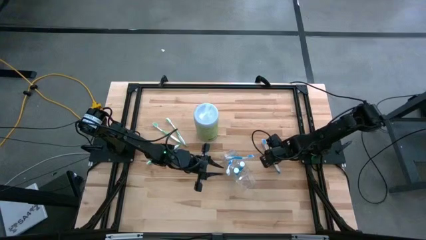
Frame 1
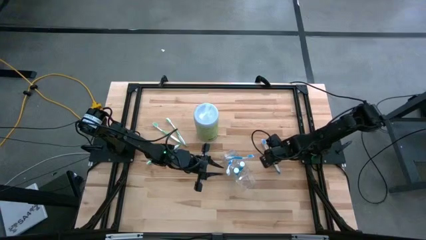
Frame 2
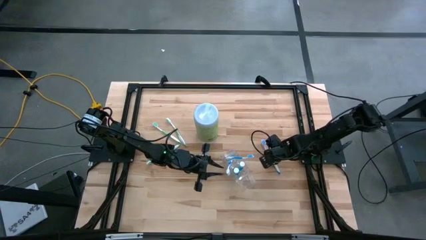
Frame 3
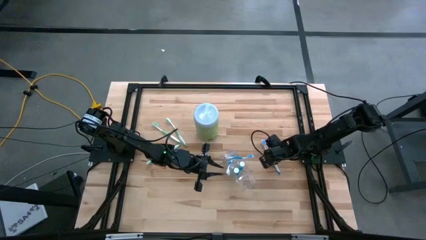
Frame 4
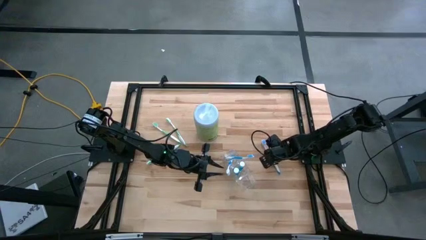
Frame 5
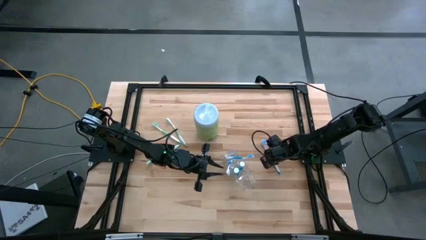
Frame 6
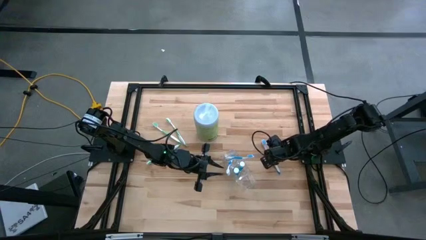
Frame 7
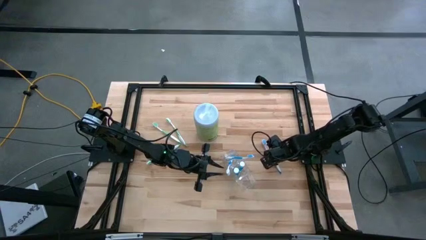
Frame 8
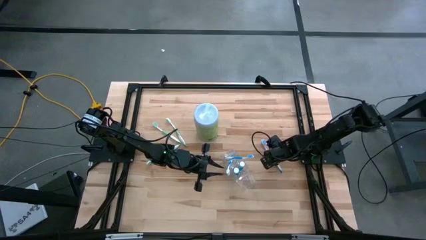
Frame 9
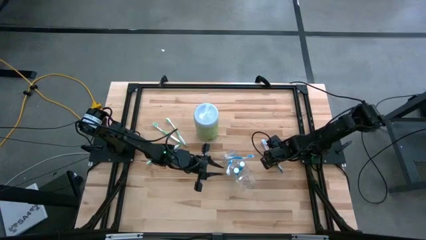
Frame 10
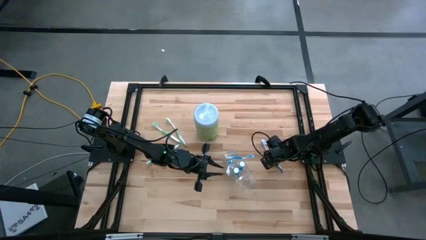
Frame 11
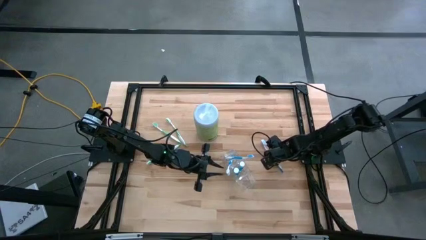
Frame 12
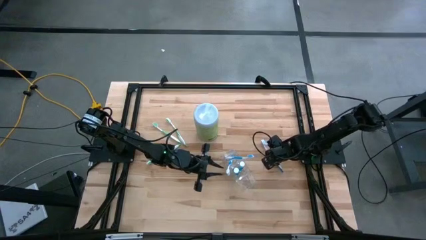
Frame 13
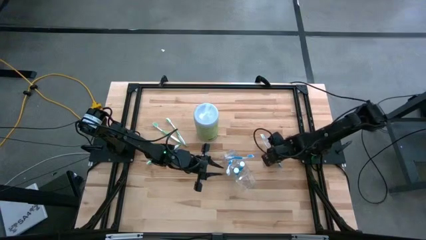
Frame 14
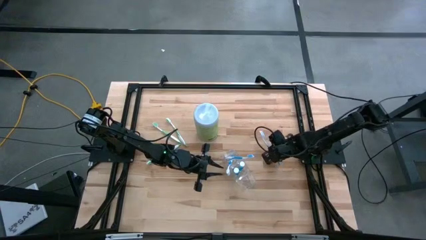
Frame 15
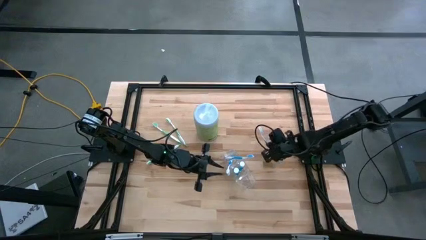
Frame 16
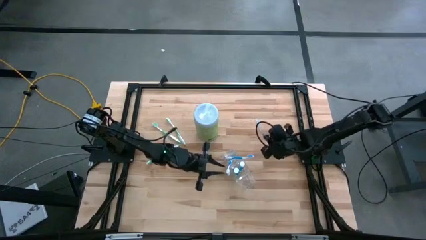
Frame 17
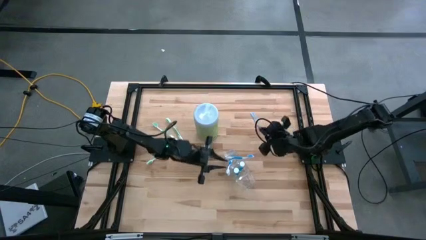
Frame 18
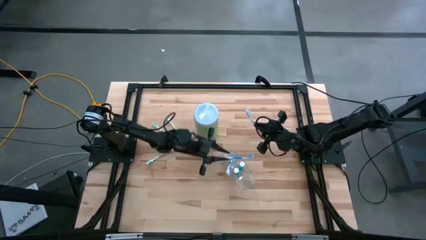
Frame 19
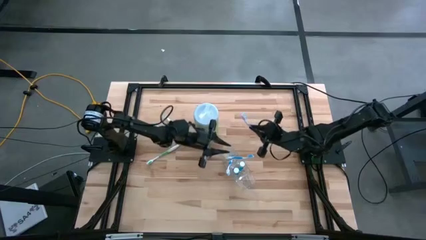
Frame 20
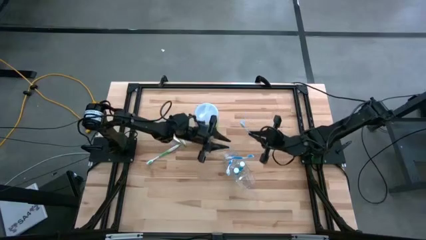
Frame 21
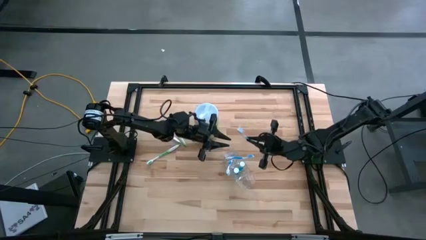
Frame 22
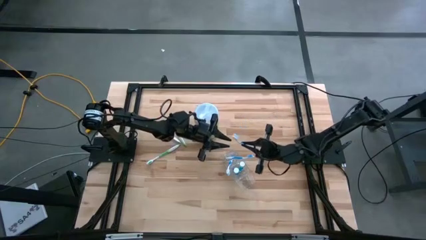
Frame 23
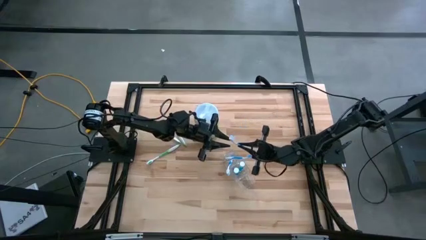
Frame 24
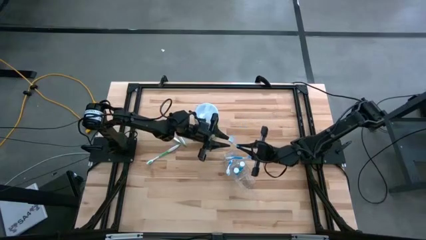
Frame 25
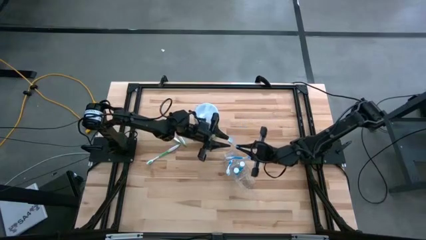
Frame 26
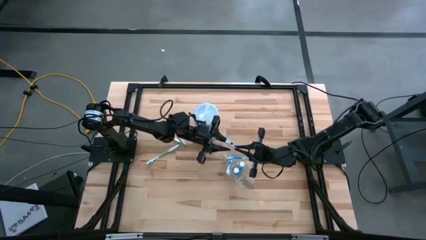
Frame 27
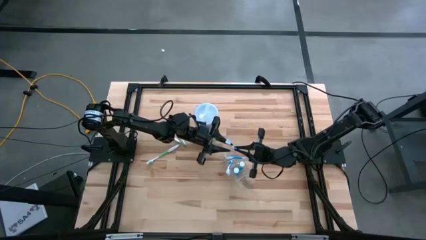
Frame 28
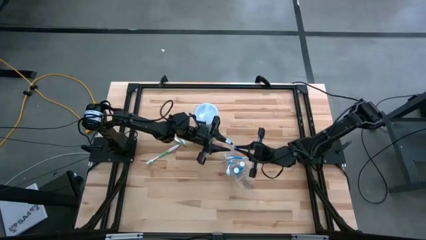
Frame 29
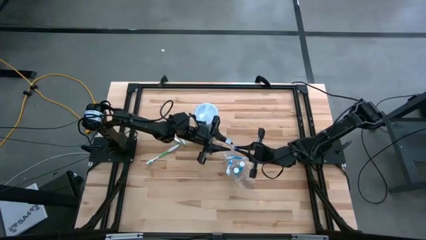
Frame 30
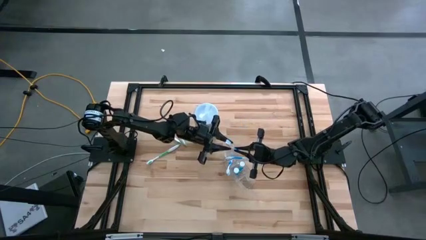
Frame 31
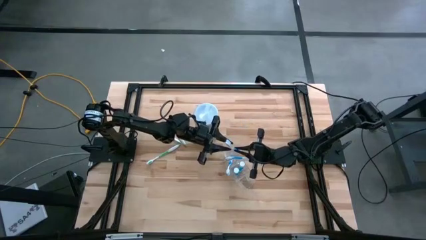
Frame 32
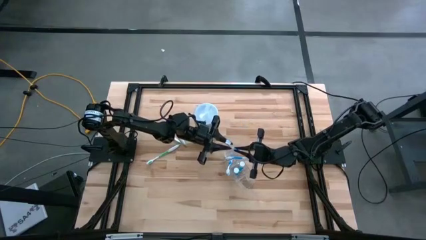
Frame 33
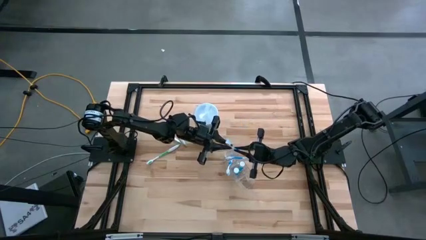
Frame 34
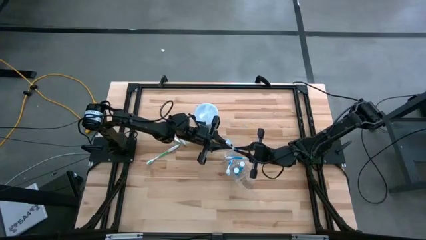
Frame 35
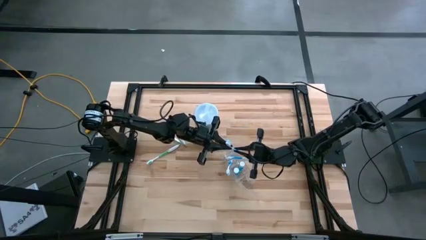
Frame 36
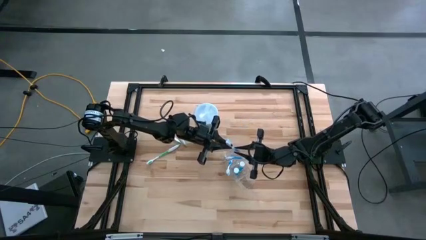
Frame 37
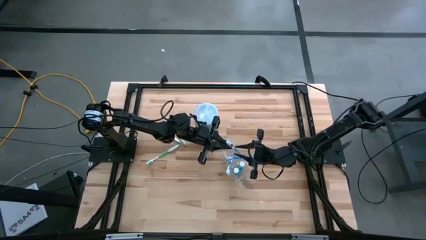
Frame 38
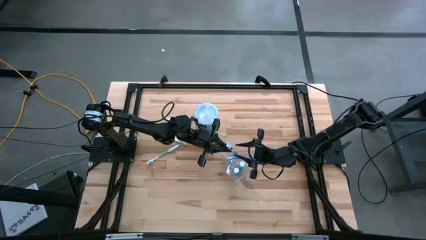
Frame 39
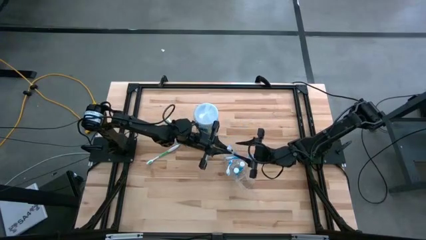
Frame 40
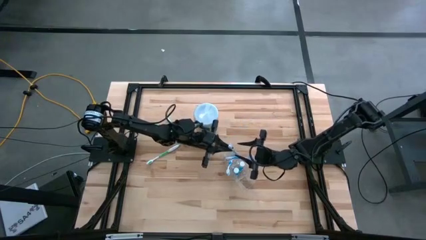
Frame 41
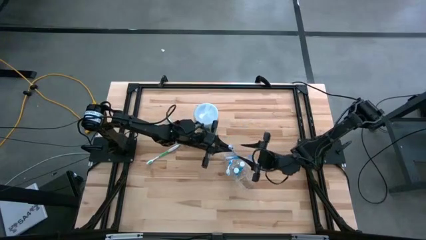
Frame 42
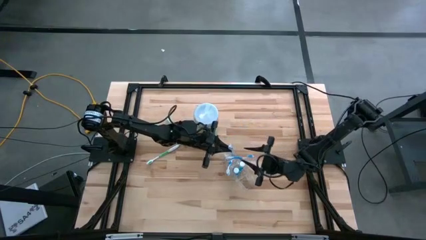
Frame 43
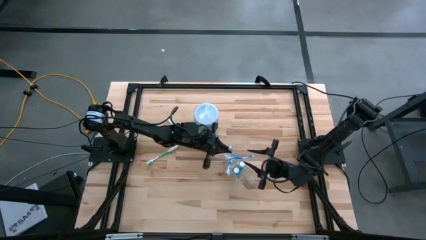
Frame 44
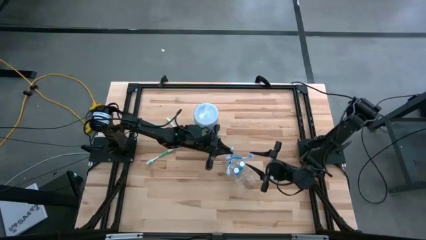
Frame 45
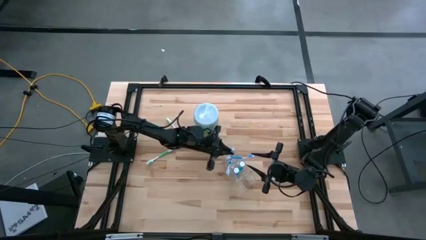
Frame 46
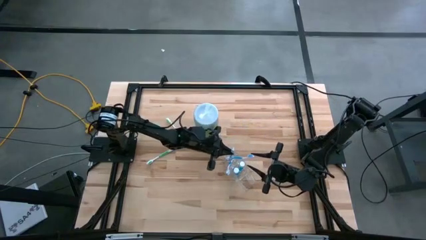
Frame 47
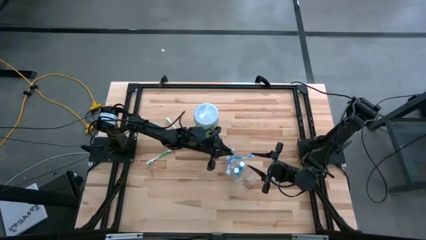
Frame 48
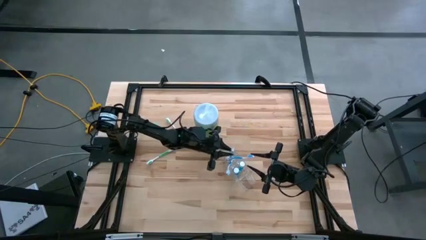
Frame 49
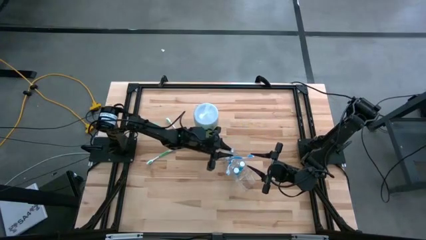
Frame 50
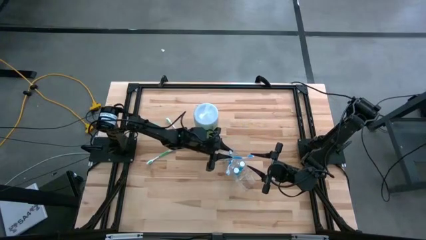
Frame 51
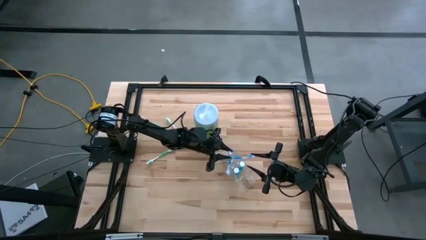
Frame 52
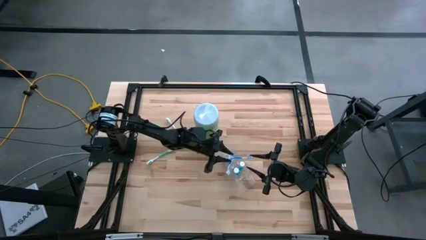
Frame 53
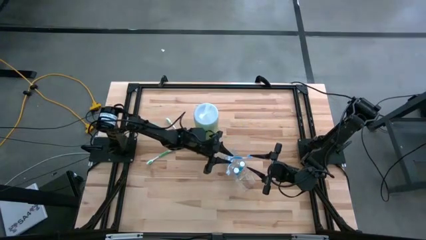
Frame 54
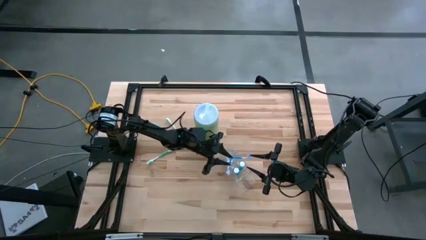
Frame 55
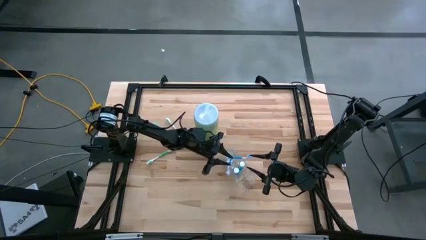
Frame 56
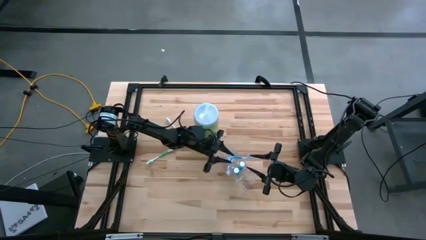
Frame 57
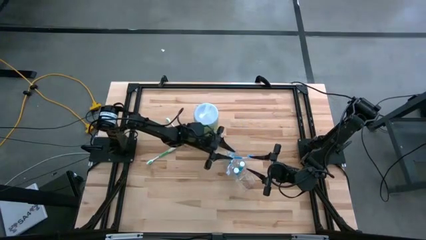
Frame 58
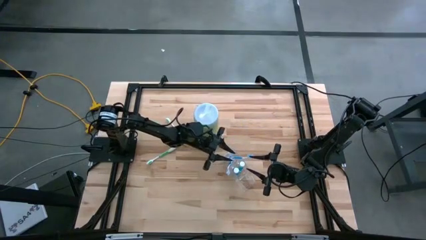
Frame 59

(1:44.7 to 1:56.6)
Task: Pick & Place toothbrushing station
Put the blue toothbrush into the transparent organizer

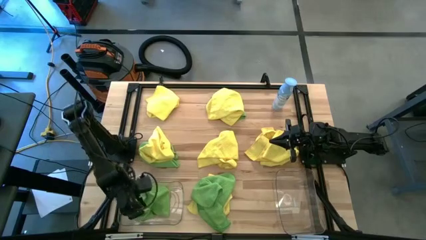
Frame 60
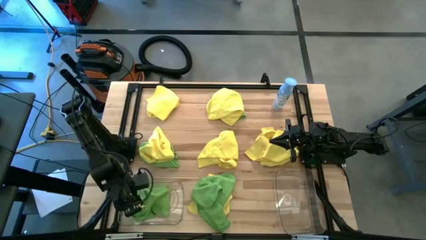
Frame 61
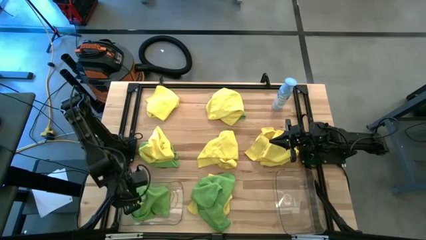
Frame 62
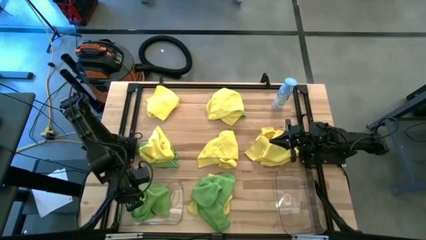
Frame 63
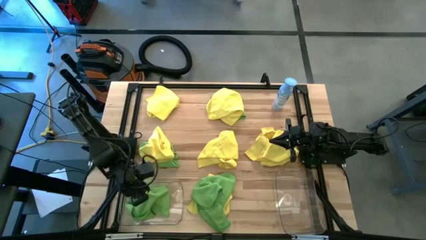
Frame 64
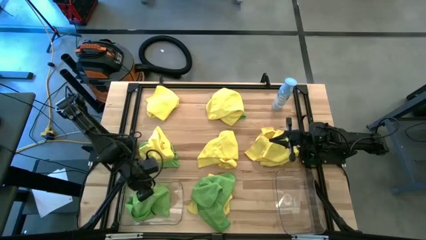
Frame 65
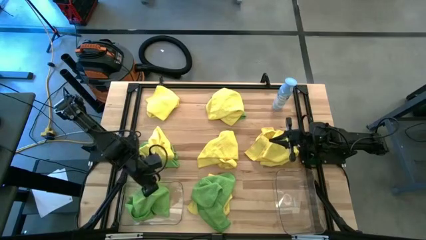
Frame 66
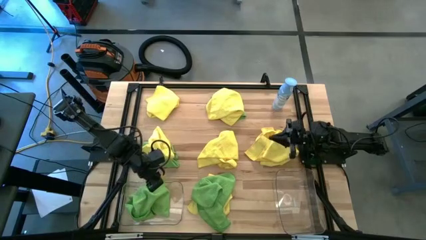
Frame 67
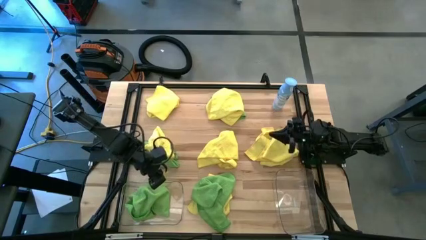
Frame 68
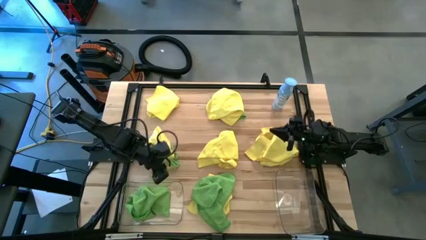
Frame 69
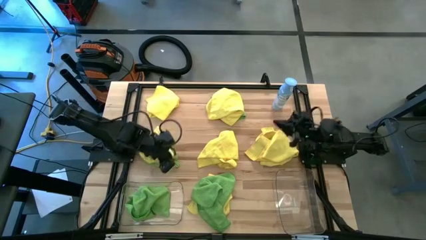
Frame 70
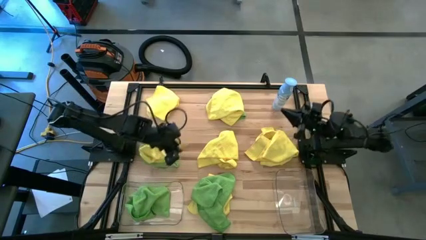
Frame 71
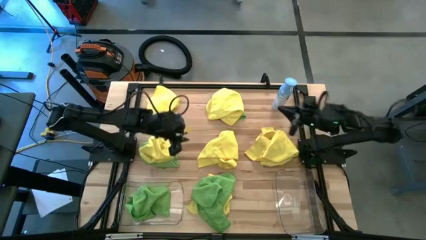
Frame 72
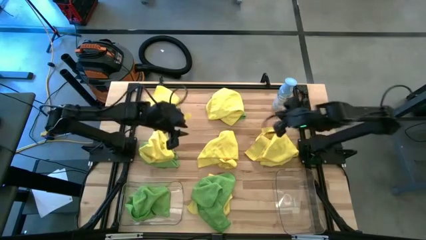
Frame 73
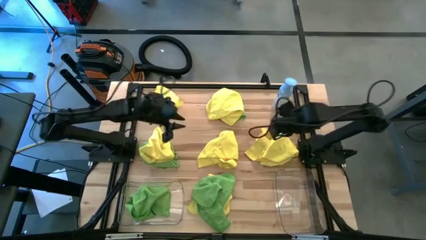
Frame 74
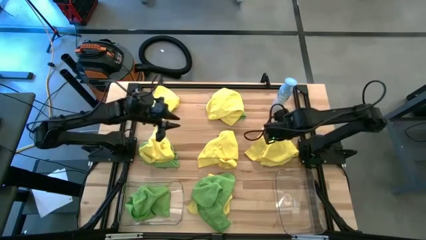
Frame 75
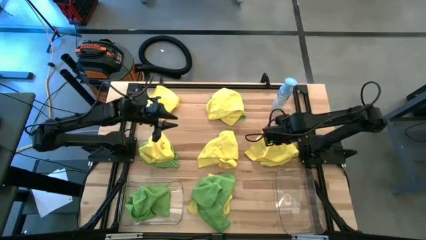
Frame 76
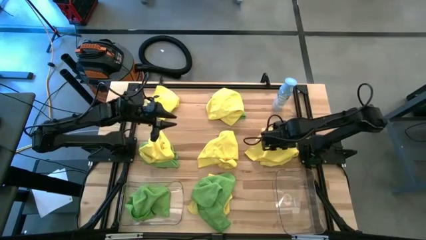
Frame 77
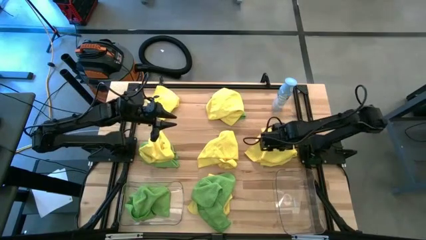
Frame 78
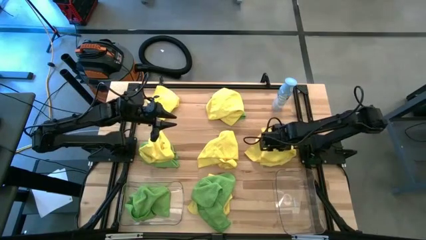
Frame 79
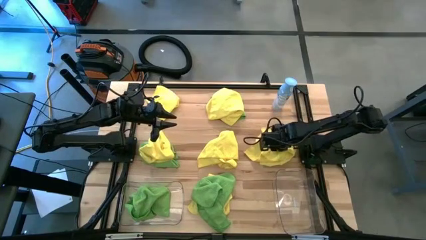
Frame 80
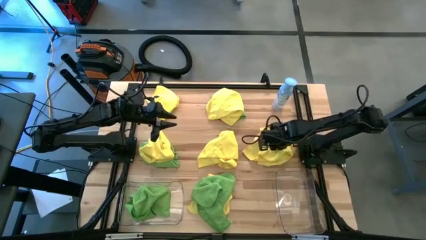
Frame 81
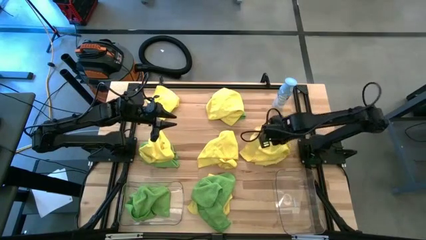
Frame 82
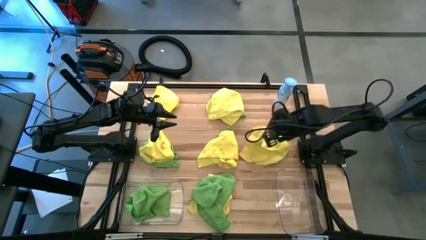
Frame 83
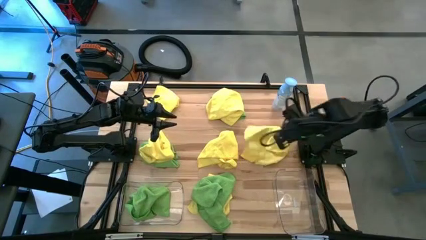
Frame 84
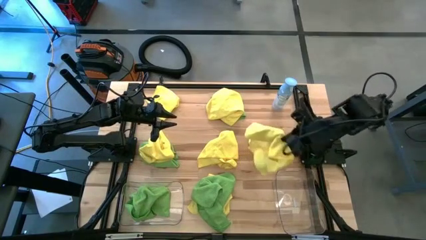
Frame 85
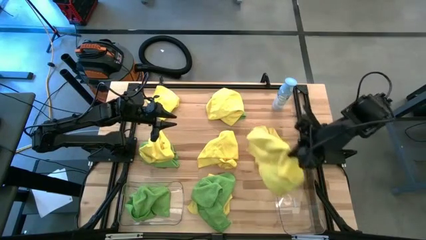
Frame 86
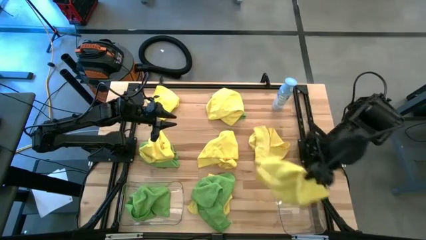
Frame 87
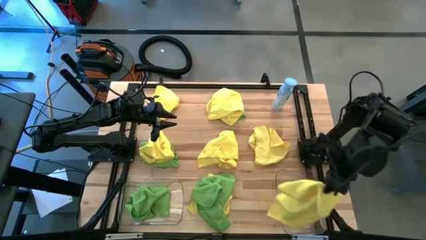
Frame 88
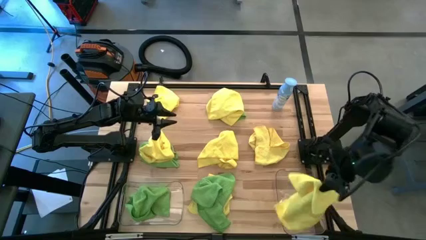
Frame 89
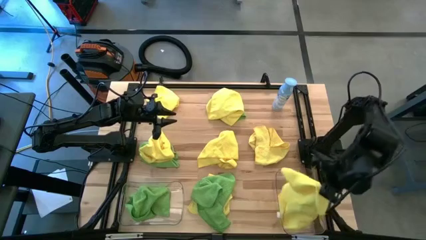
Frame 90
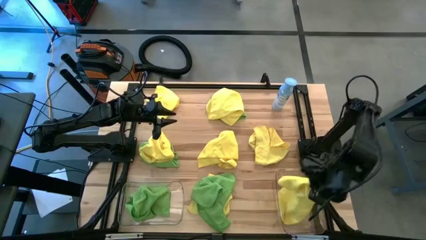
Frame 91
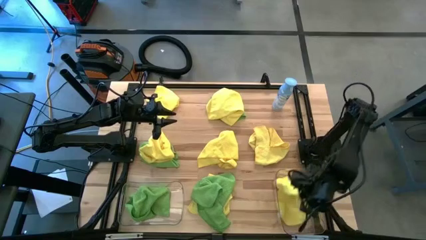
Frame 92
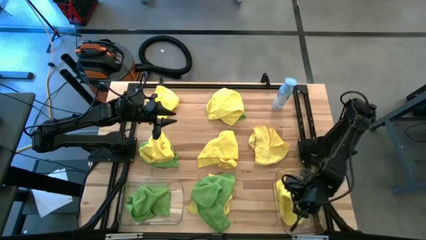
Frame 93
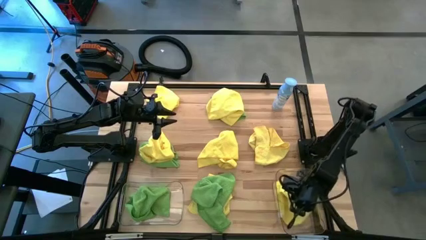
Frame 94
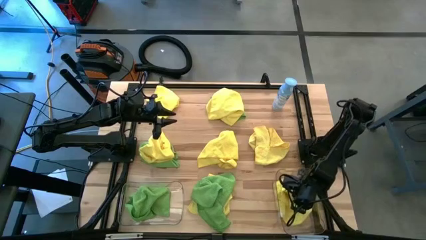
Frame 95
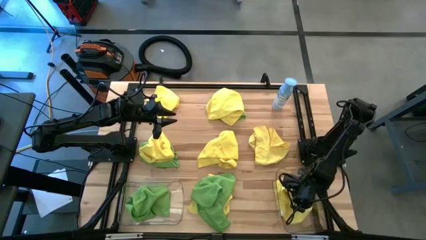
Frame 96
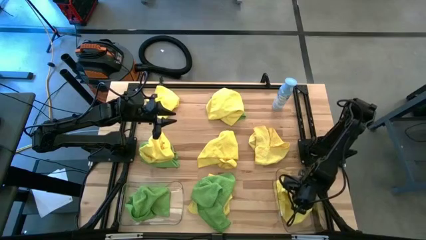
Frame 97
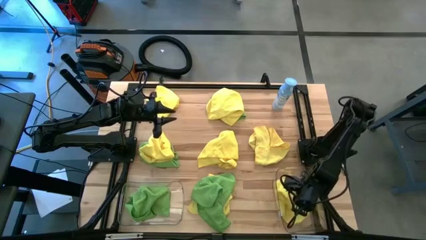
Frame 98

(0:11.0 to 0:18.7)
Task: Sort microfiber towel by color & place in baskets
Put the middle right yellow microfiber towel into the right transparent bin
